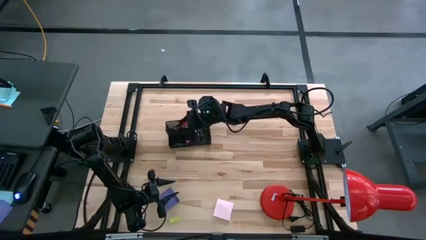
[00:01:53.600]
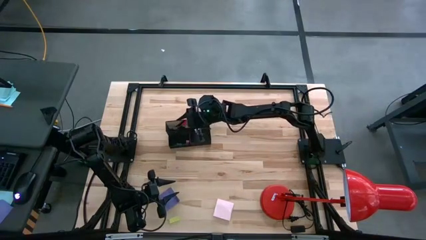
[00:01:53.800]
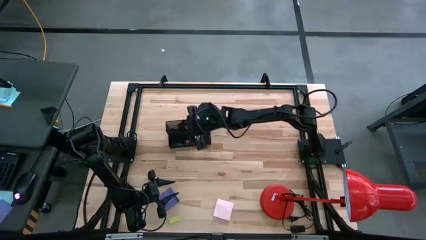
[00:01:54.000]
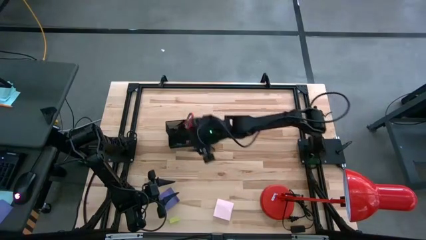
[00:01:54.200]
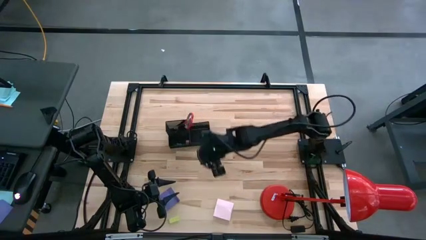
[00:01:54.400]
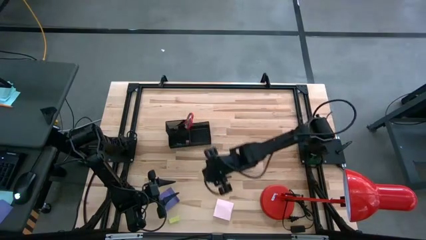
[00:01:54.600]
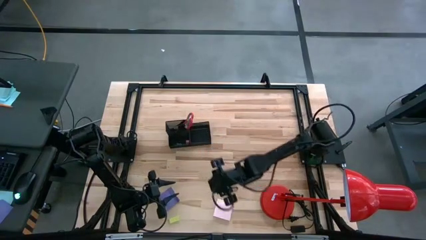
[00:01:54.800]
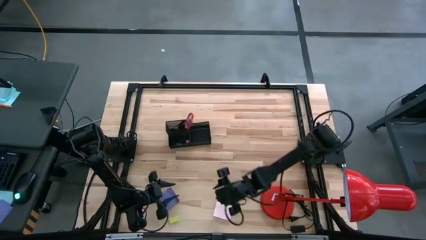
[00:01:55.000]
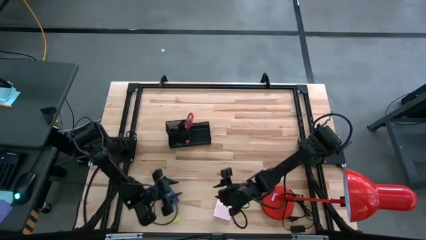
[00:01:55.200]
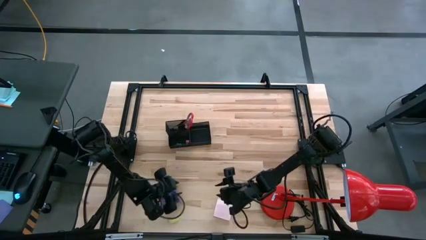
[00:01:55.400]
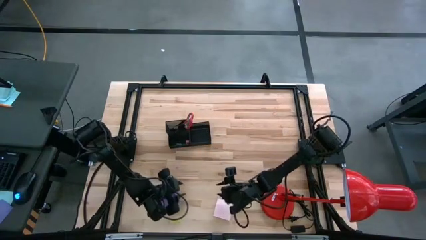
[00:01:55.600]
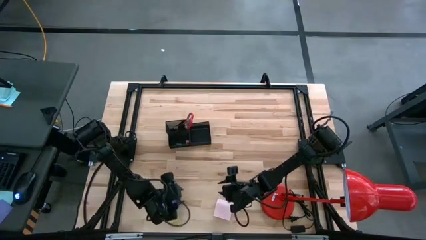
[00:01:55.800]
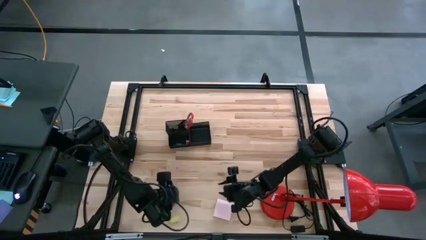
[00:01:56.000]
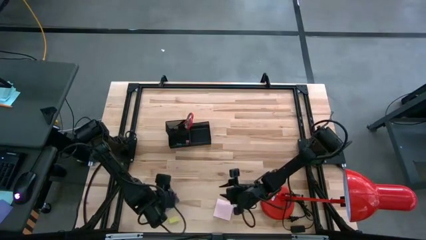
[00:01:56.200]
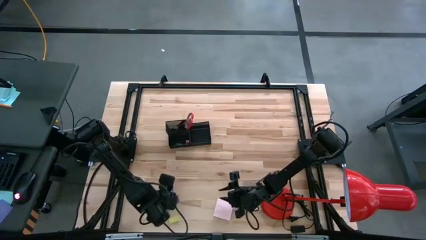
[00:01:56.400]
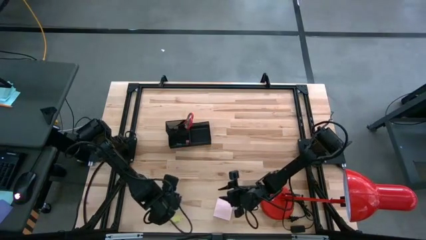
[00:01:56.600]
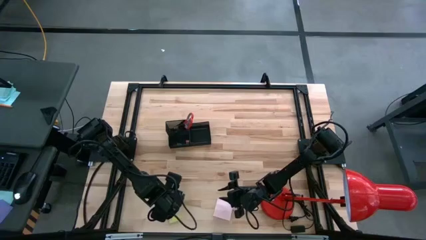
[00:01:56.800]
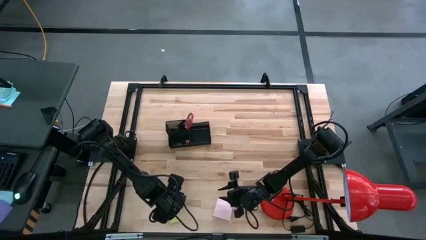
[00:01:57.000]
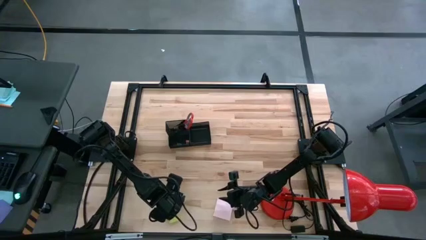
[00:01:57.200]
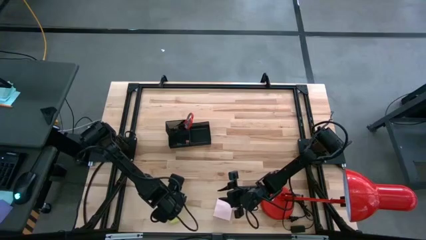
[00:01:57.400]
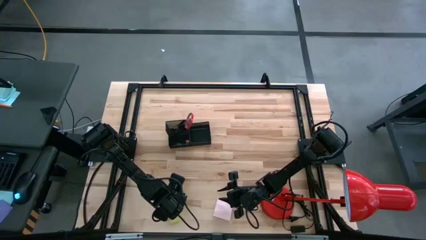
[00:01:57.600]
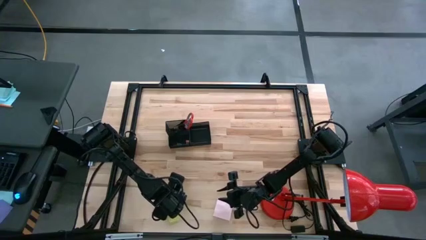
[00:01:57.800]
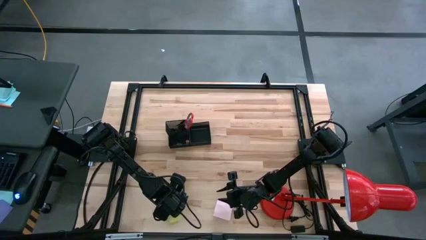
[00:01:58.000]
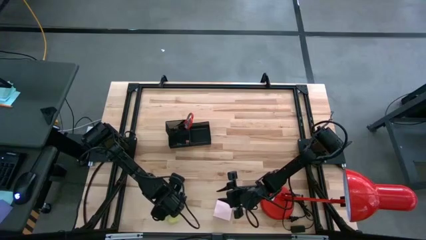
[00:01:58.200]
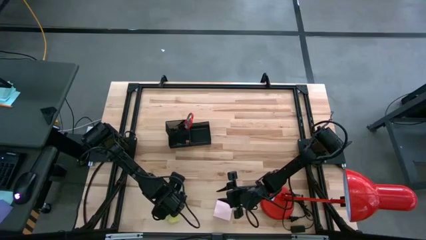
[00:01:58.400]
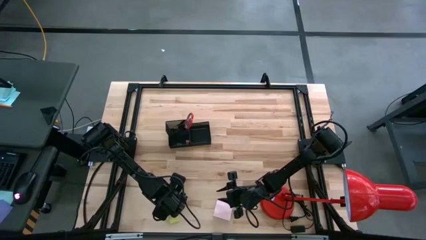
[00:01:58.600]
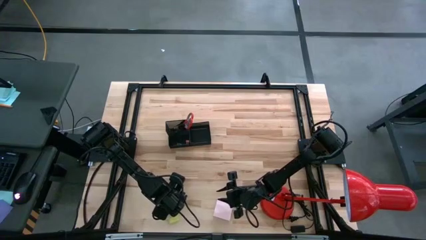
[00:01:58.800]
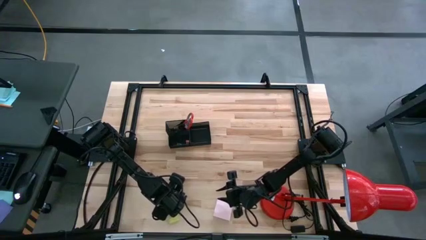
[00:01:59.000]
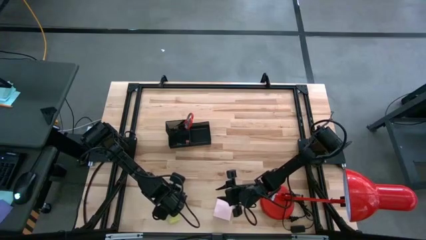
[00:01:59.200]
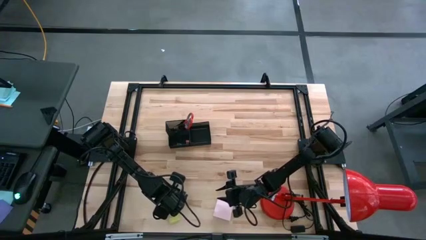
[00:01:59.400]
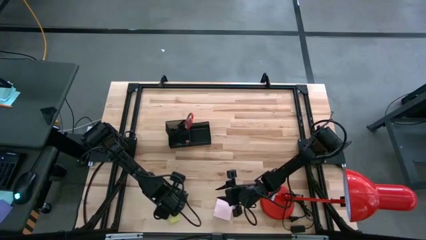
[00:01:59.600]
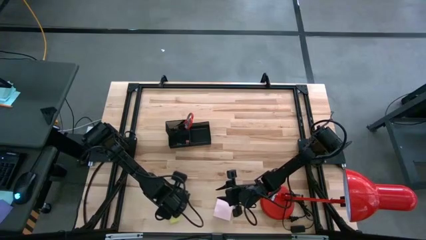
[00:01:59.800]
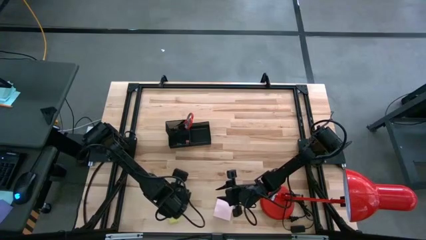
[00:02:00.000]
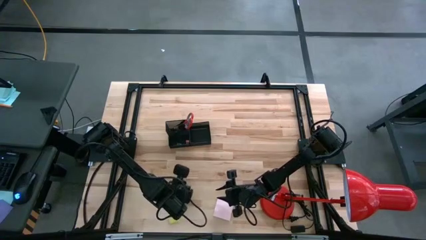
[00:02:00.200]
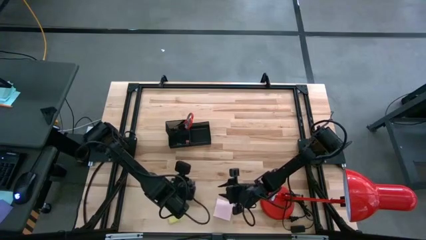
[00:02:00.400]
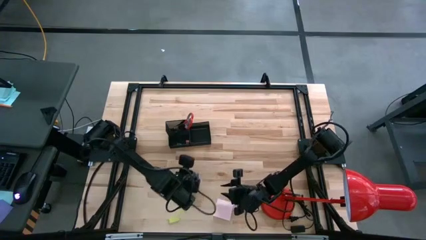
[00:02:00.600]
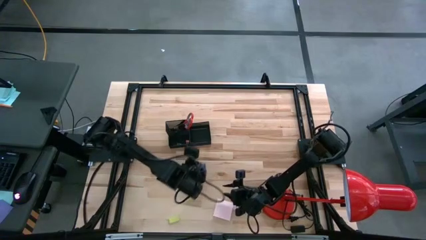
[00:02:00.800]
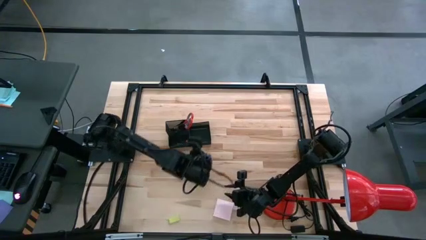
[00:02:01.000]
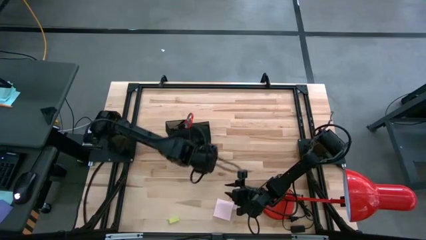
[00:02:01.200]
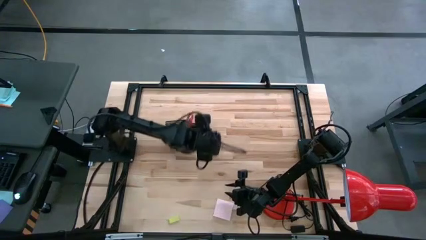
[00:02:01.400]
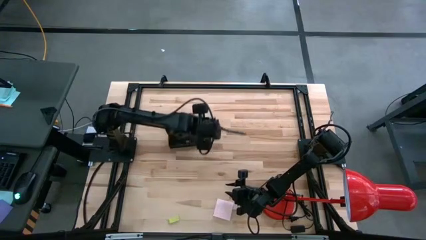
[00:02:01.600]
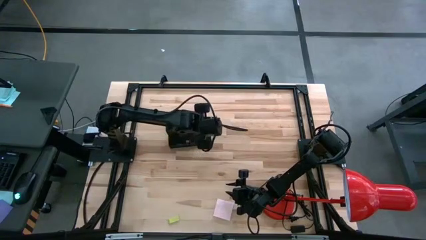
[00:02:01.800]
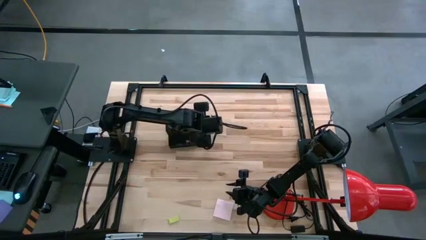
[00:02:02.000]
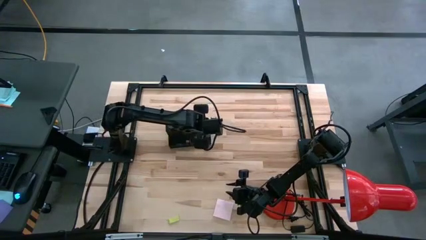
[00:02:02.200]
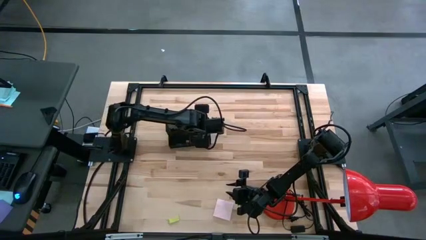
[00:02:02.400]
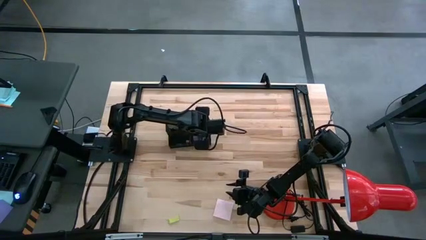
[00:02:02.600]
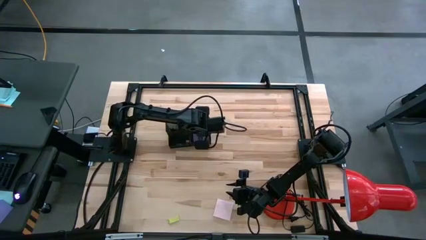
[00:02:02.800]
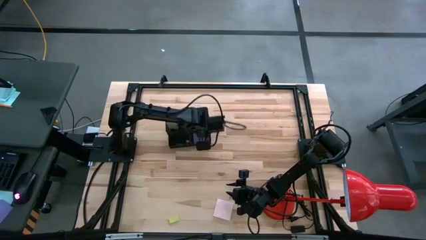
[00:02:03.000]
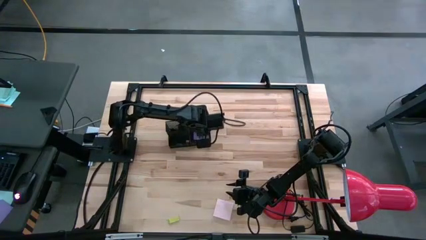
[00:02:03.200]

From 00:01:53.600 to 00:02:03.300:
Task: Pick and place office supplies into organizer
Put the left purple sticky note into the desk organizer
